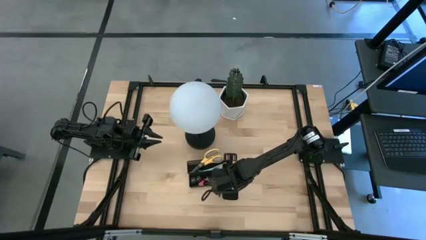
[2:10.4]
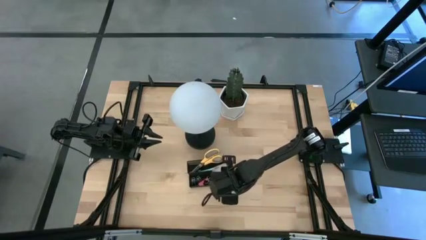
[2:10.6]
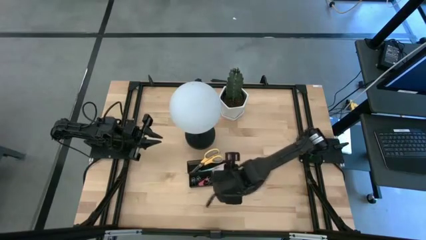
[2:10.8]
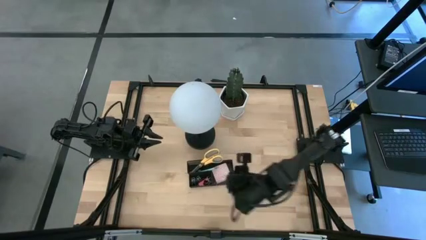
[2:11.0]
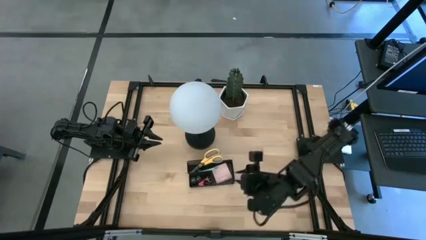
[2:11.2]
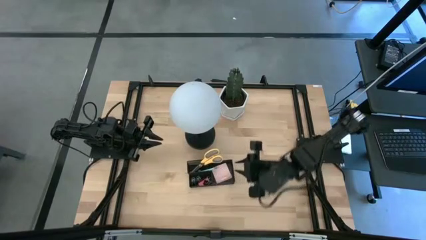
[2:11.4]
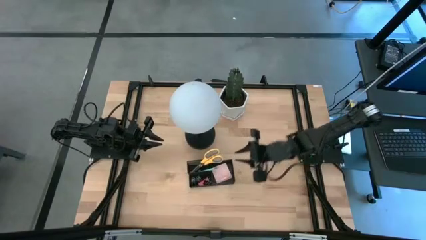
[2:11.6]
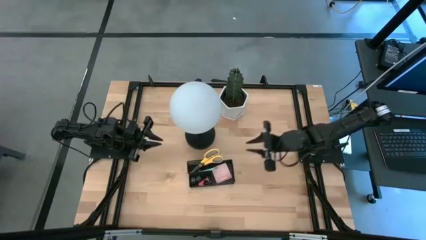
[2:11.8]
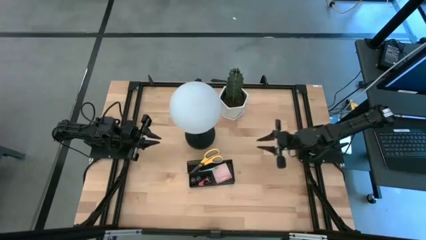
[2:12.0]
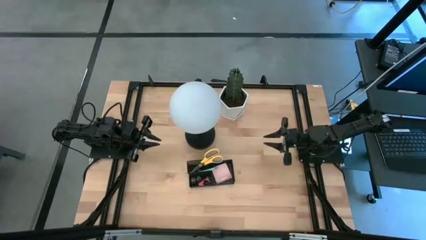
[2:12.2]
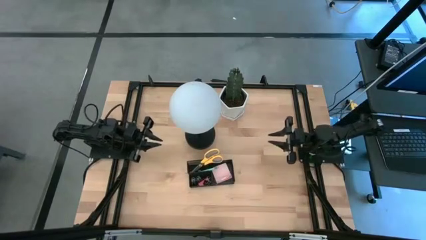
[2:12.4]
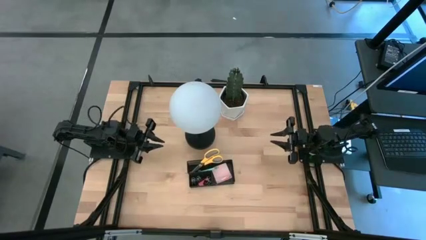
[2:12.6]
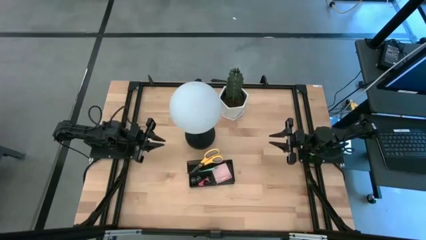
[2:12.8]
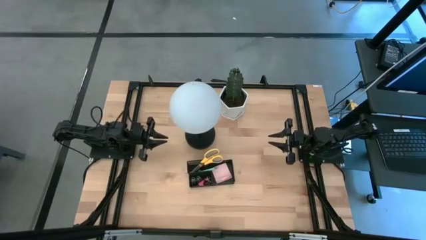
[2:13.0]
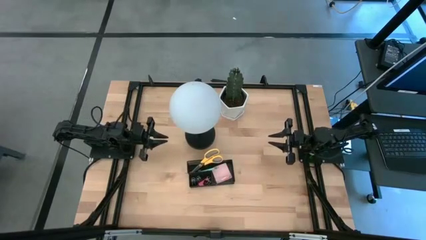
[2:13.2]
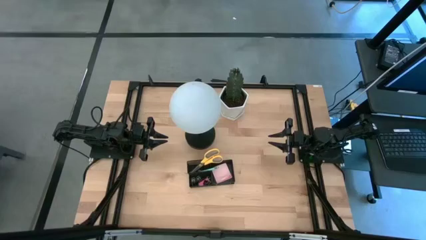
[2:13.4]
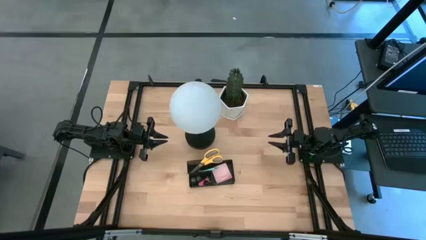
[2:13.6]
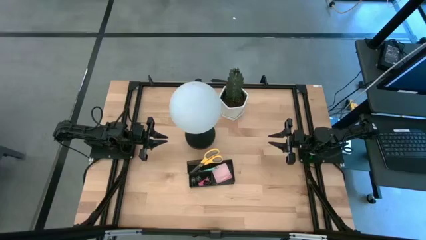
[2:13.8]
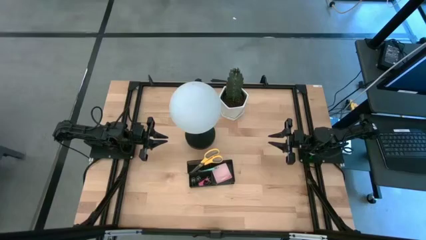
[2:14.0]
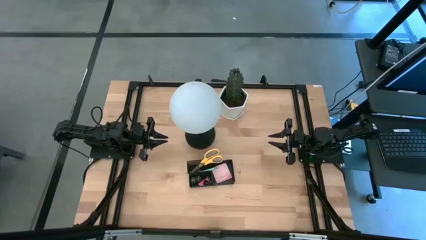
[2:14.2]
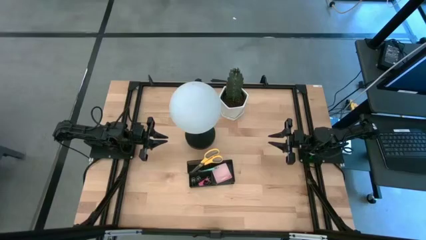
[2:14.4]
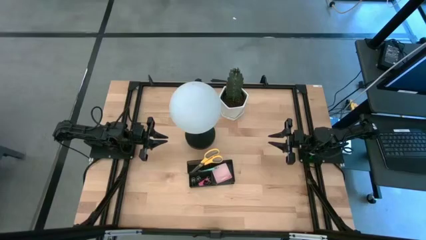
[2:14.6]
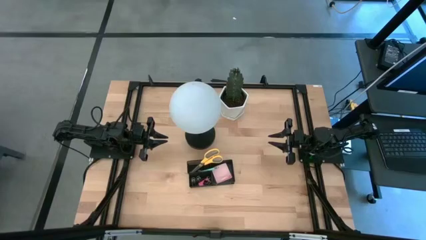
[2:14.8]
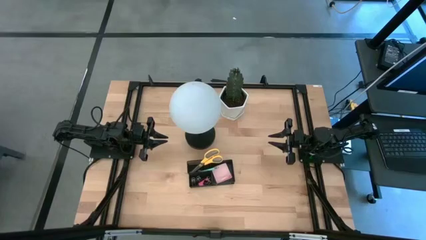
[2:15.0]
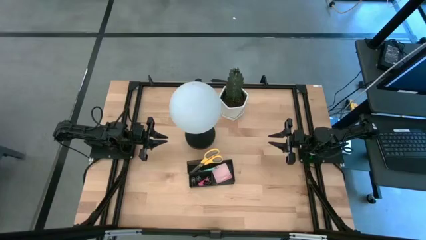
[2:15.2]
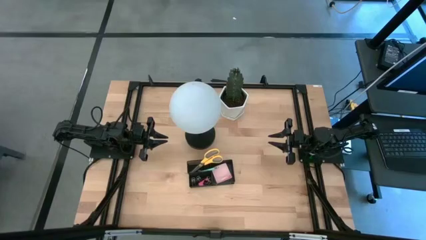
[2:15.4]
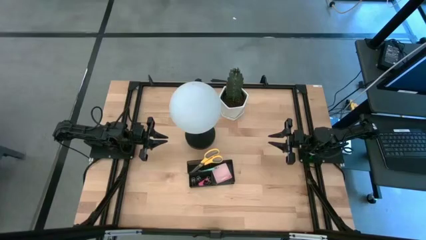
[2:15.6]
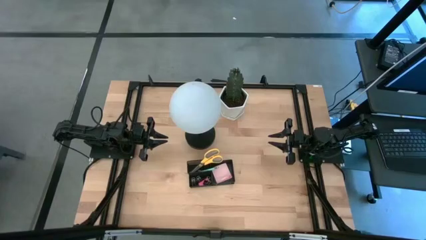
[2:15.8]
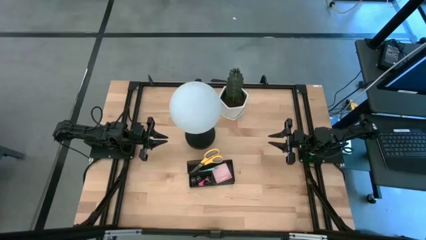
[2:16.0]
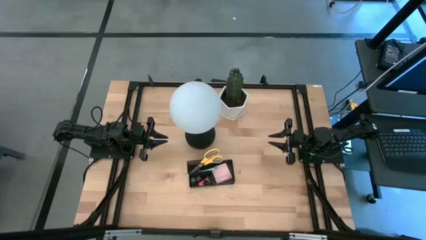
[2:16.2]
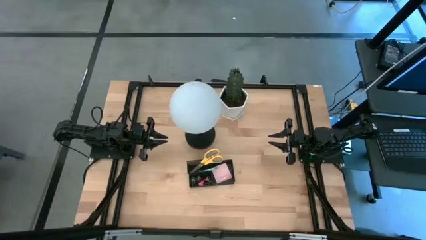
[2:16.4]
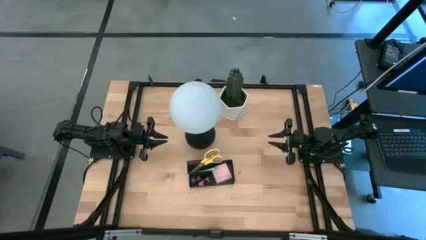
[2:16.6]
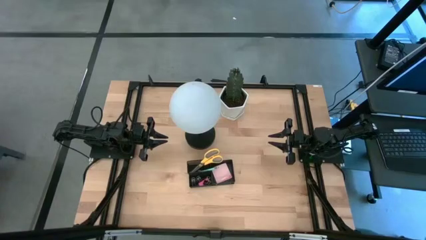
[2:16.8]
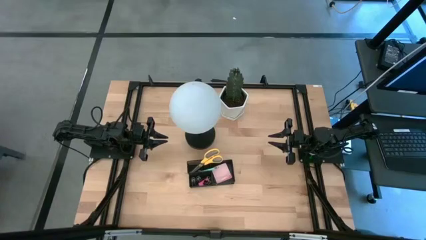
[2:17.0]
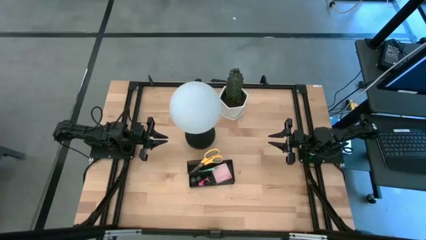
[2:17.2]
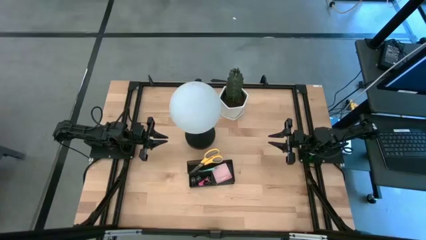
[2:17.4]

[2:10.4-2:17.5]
Task: Pick and place office supplies into organizer
Return to Home Position
